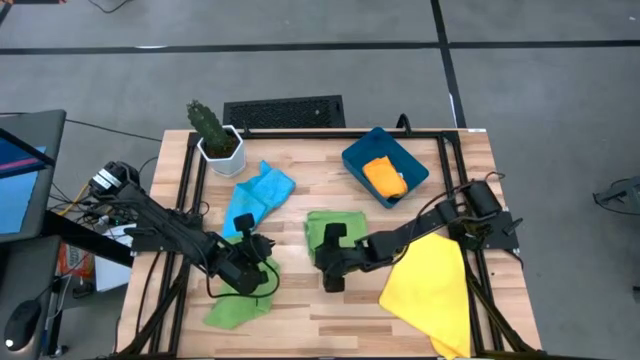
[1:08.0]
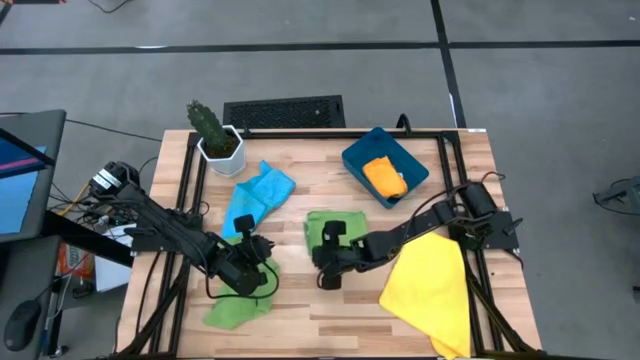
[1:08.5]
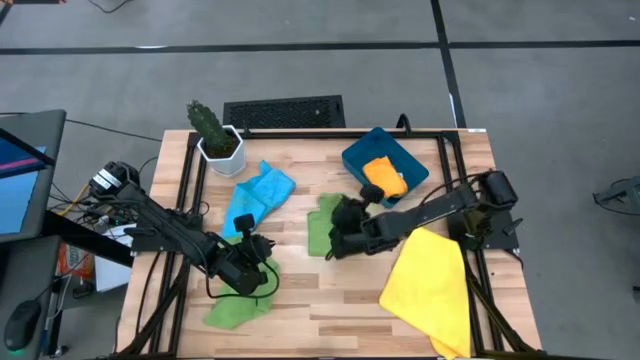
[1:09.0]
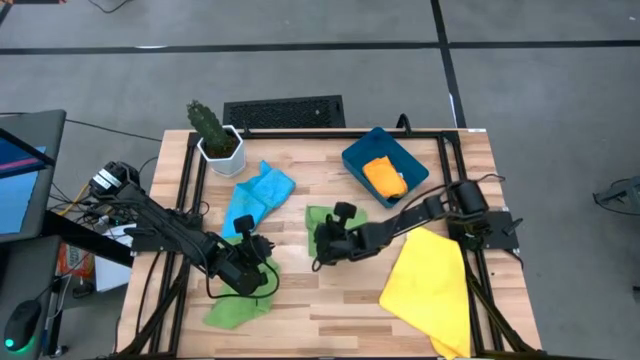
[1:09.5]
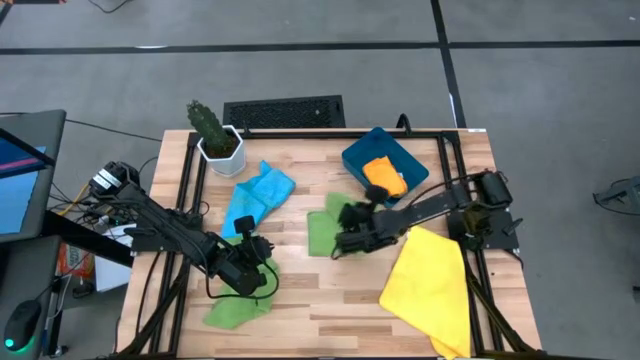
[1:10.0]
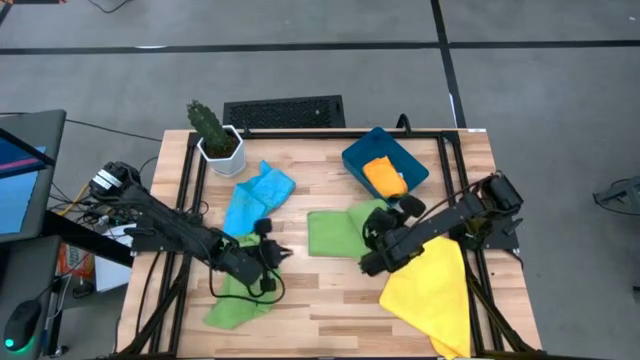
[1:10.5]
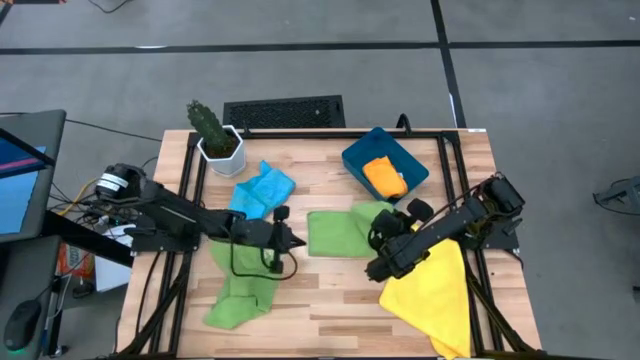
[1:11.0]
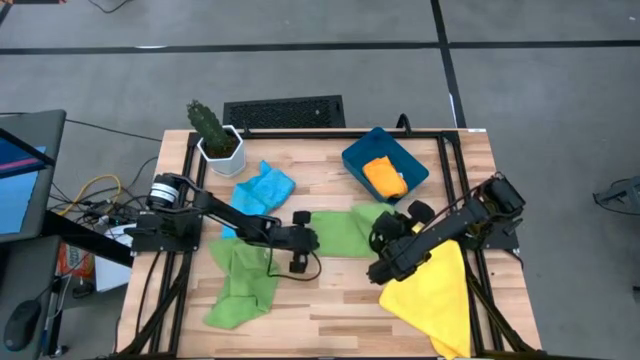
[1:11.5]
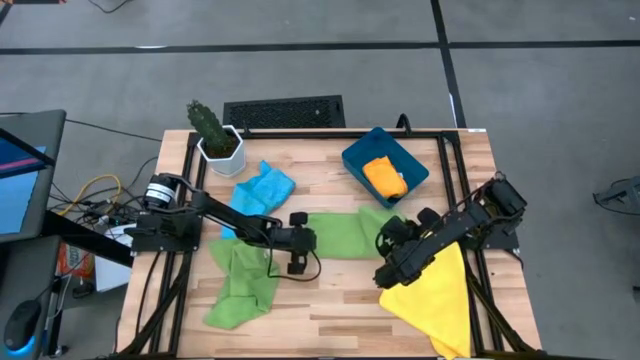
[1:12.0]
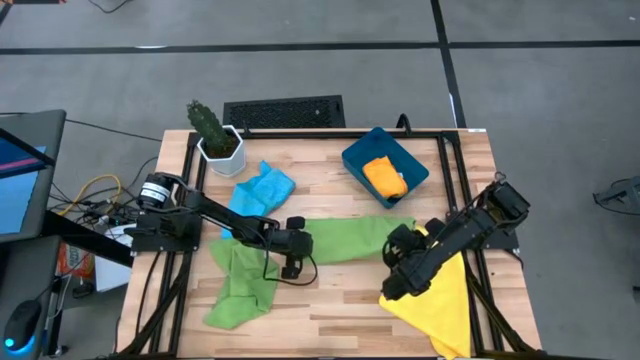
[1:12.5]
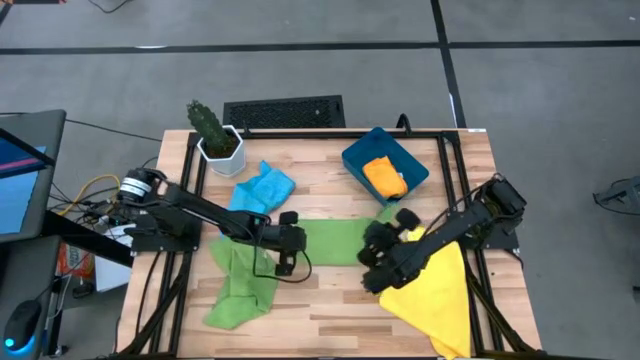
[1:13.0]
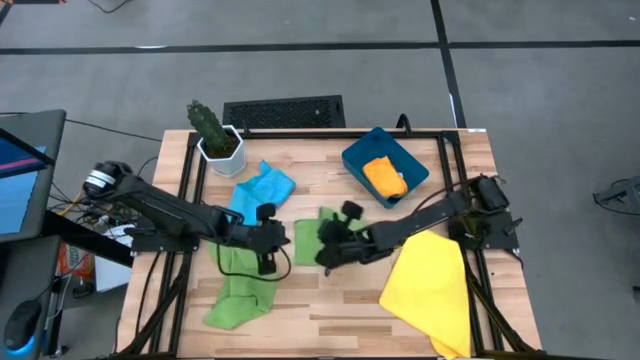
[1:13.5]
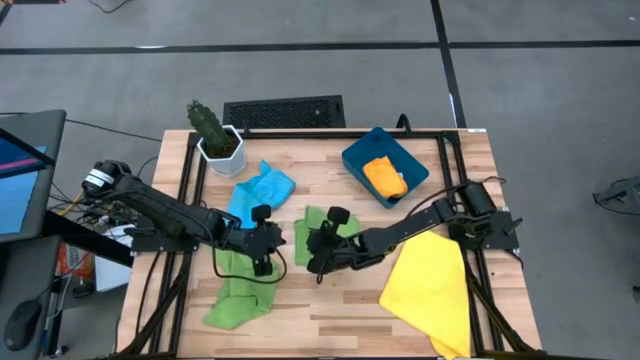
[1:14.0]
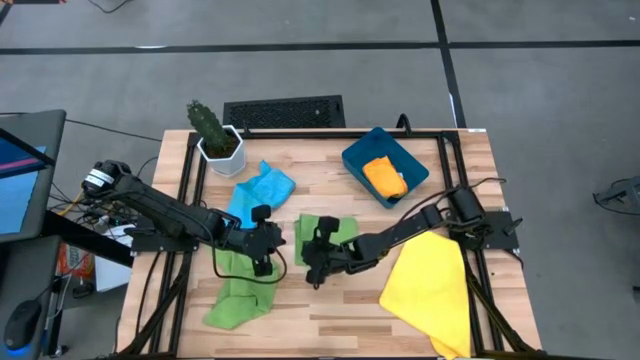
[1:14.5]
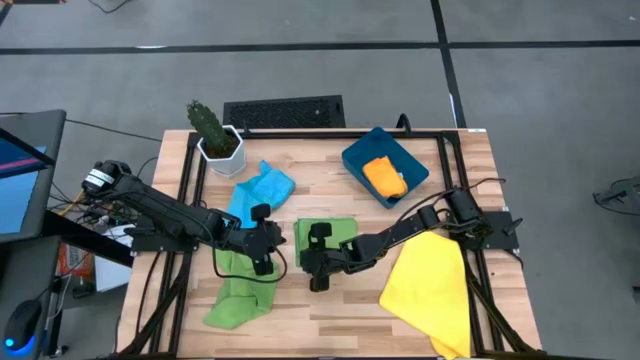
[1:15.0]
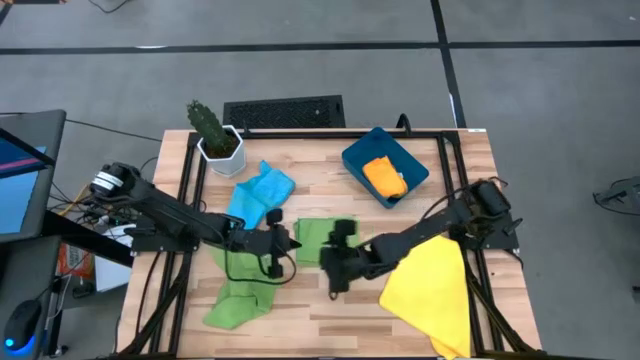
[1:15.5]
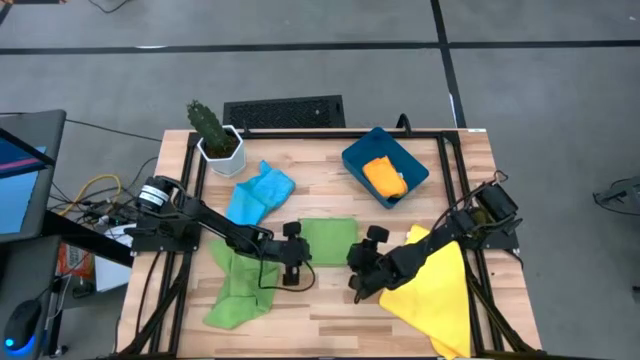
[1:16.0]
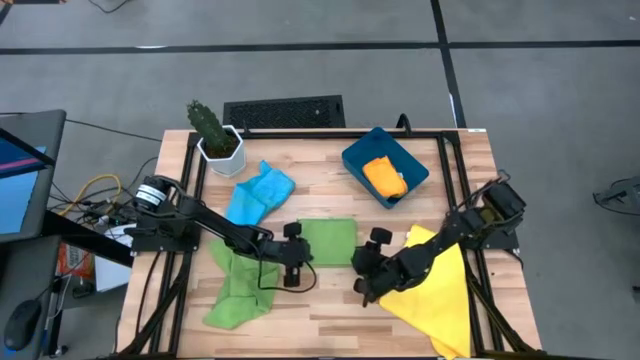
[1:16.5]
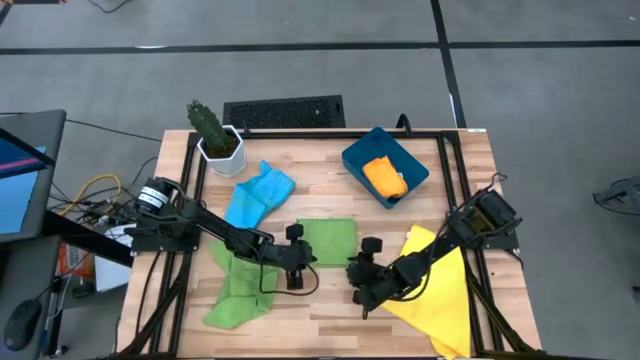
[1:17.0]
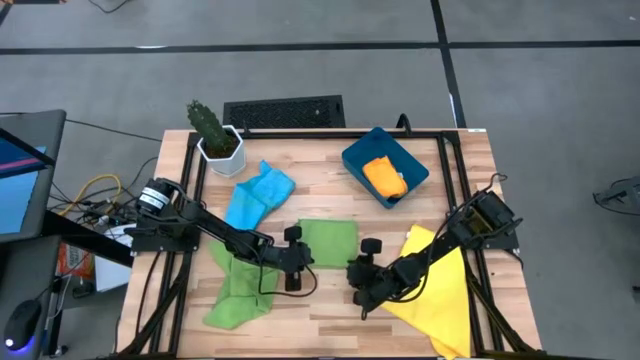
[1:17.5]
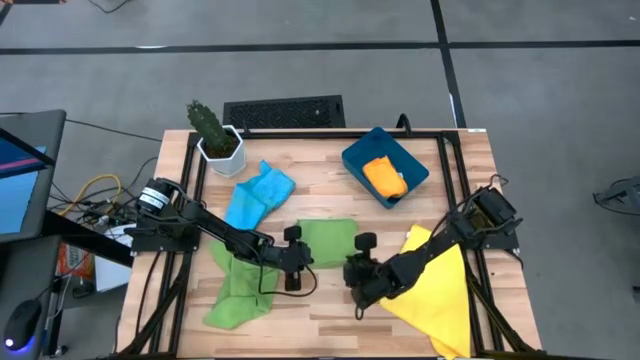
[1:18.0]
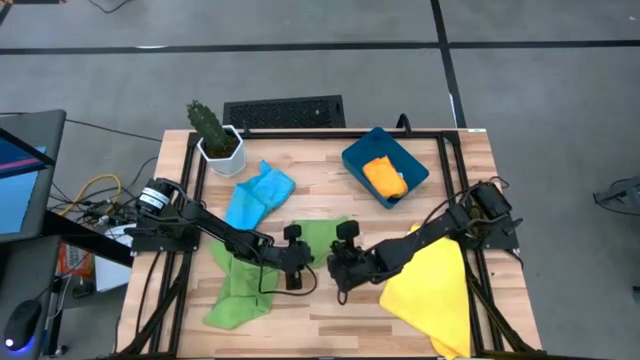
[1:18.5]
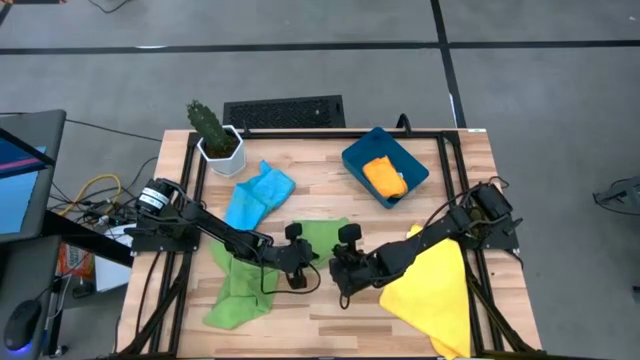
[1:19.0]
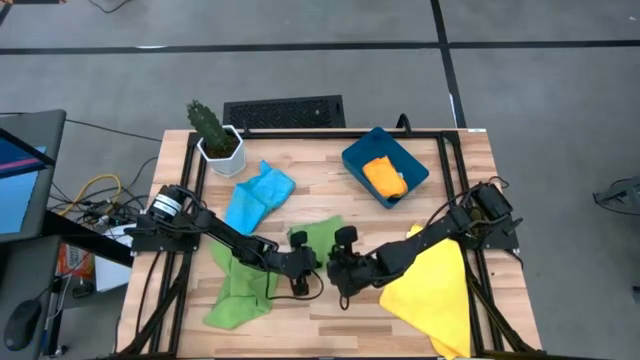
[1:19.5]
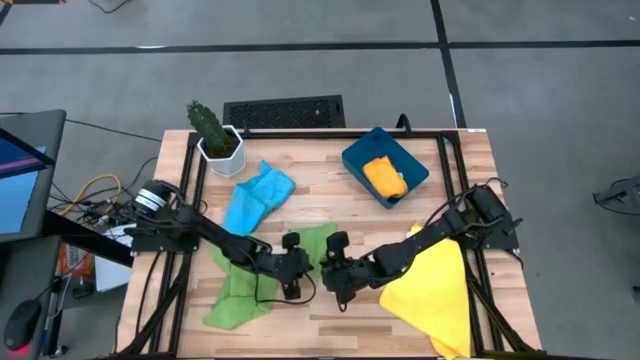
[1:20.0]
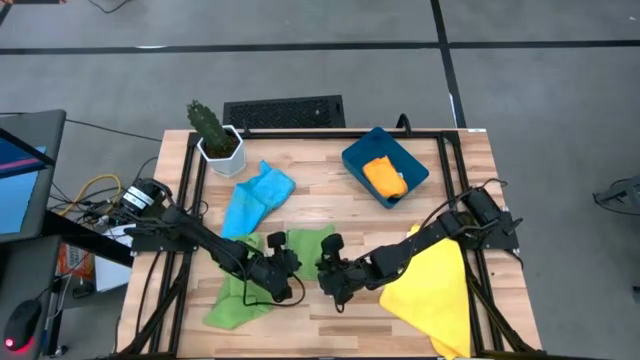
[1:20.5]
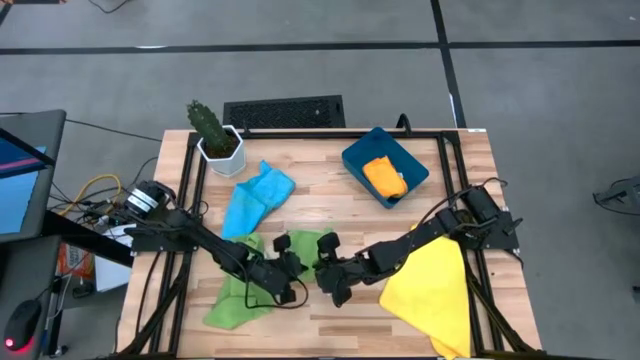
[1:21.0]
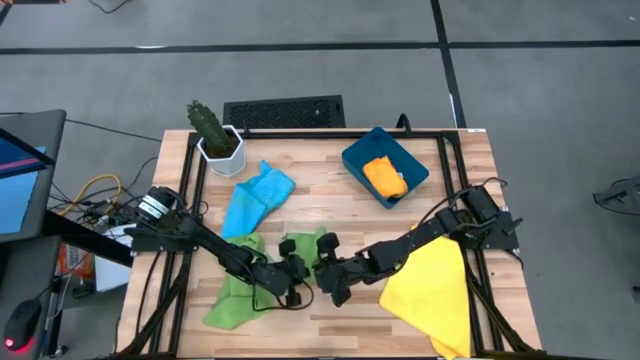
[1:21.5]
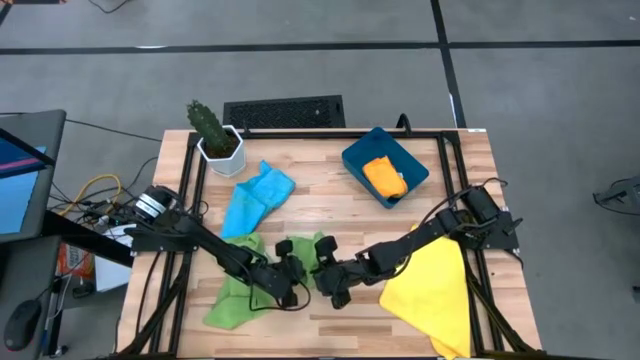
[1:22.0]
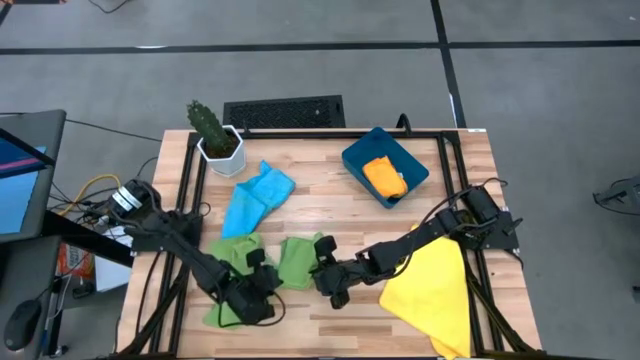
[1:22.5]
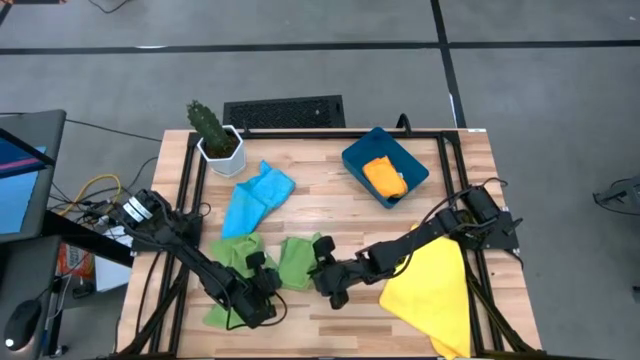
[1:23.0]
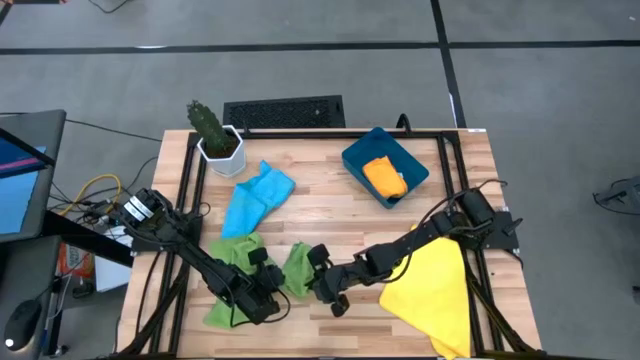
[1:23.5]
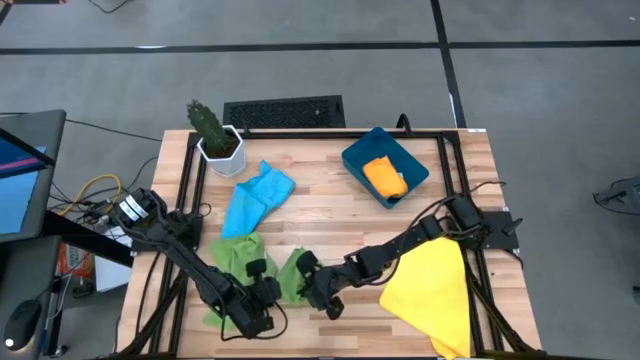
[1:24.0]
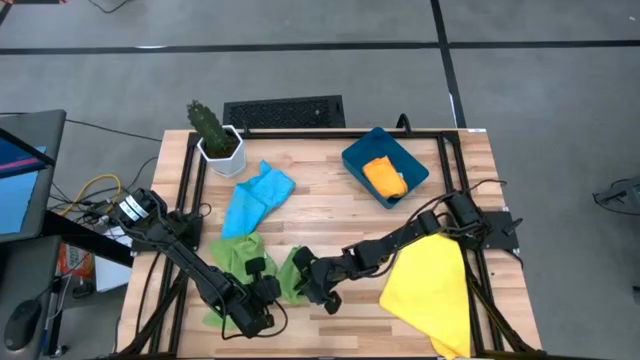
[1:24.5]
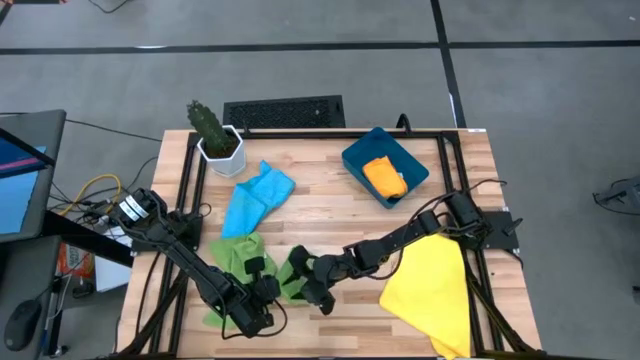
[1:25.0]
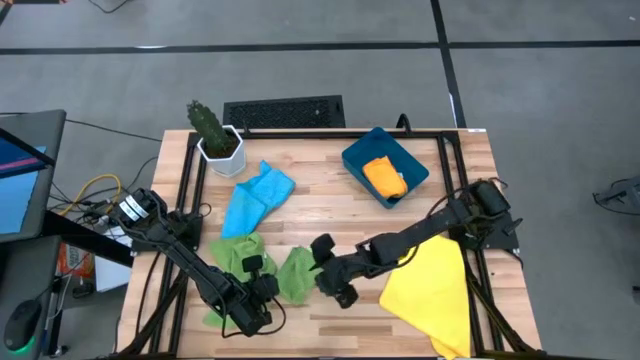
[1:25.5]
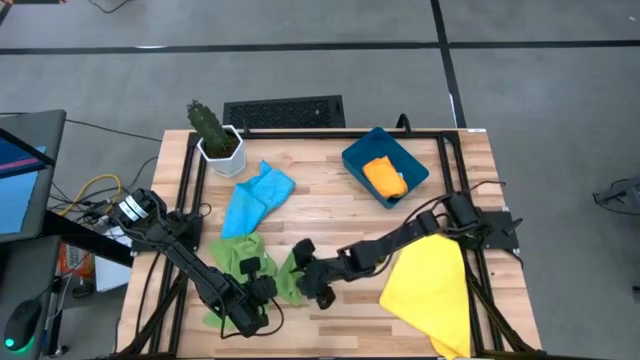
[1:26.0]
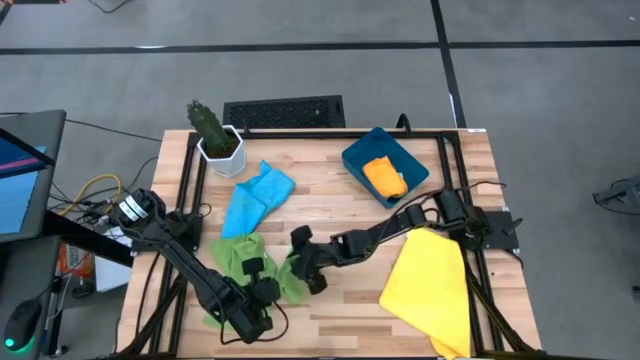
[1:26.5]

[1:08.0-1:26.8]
Task: Fold microfiber towels
Fold the right green microfiber towel

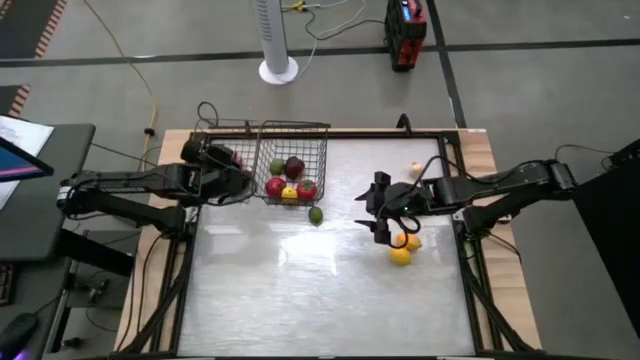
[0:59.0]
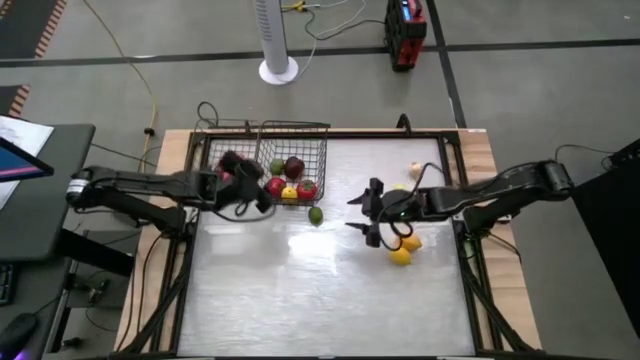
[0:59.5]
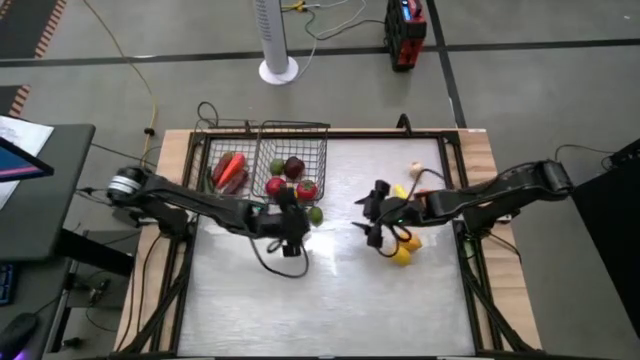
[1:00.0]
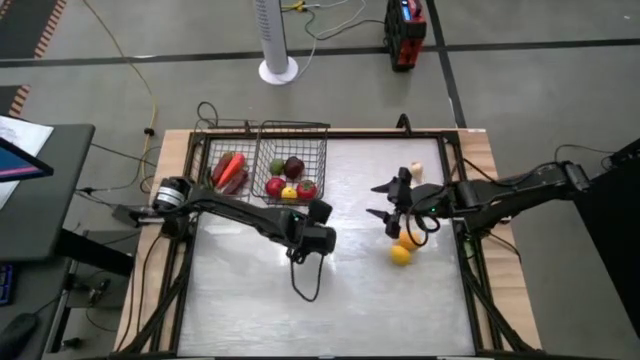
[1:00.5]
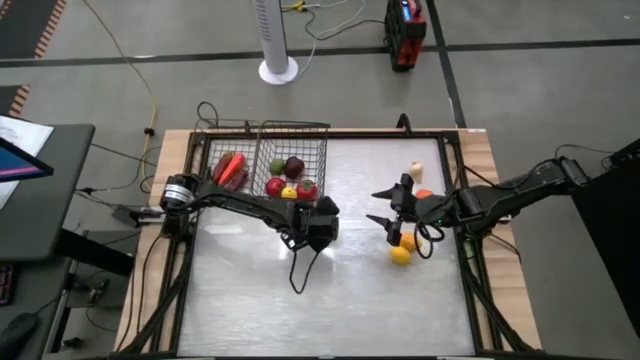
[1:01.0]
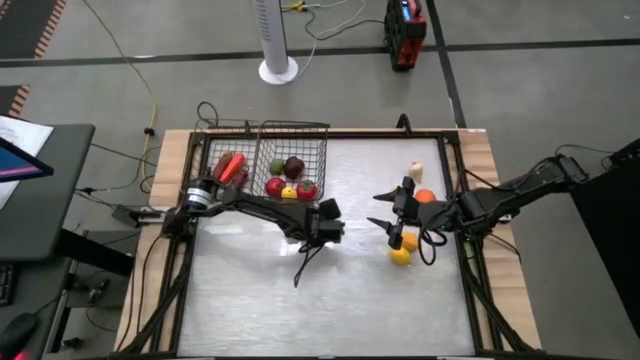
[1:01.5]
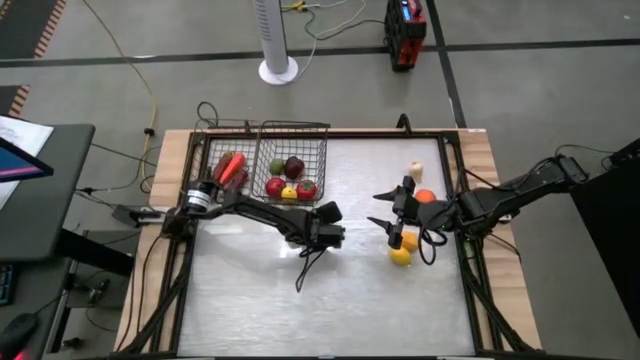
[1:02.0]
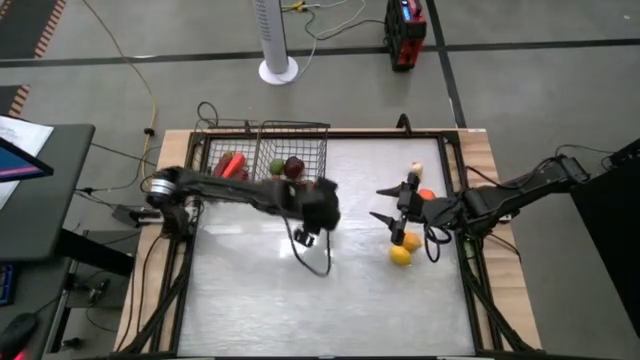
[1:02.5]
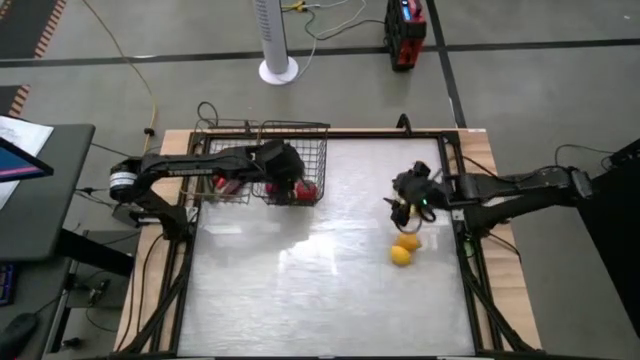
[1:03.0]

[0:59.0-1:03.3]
Task: Sort produce into baskets
Put the lime into the right wire basket
